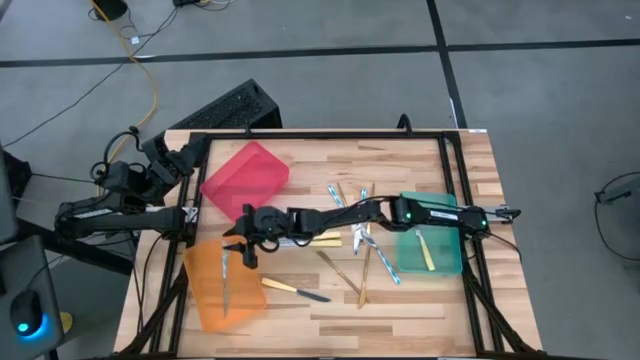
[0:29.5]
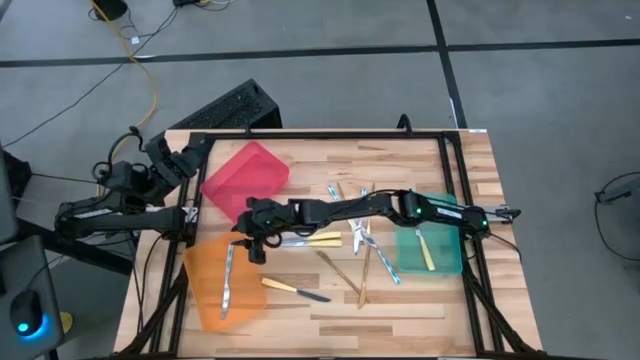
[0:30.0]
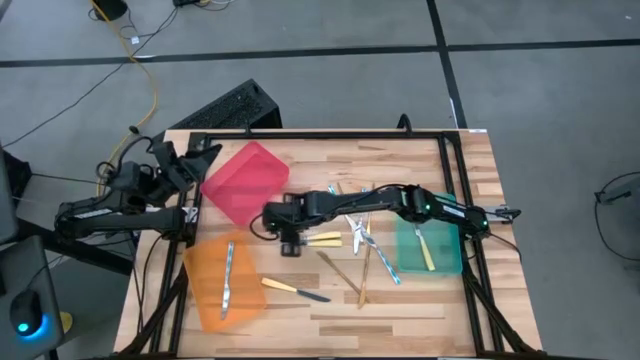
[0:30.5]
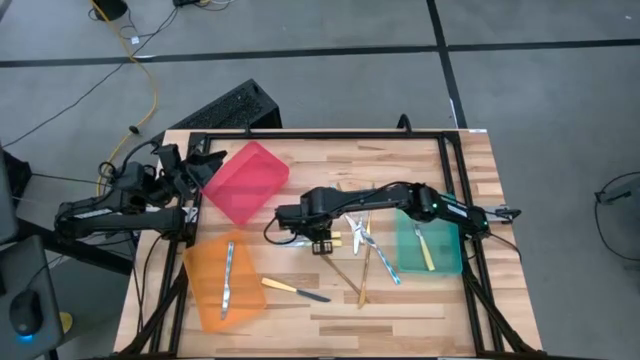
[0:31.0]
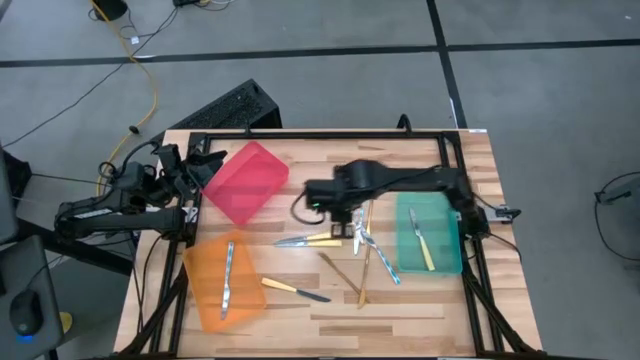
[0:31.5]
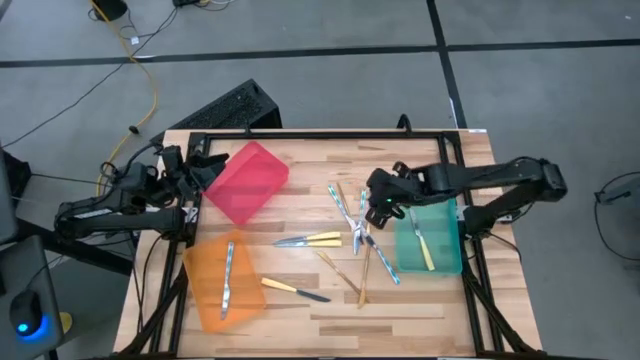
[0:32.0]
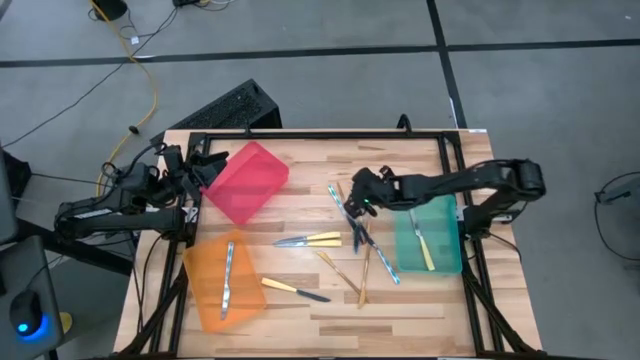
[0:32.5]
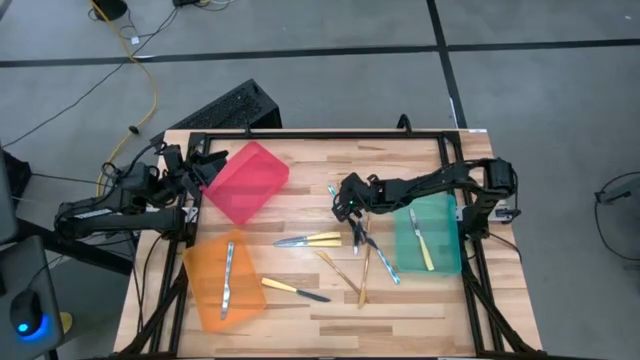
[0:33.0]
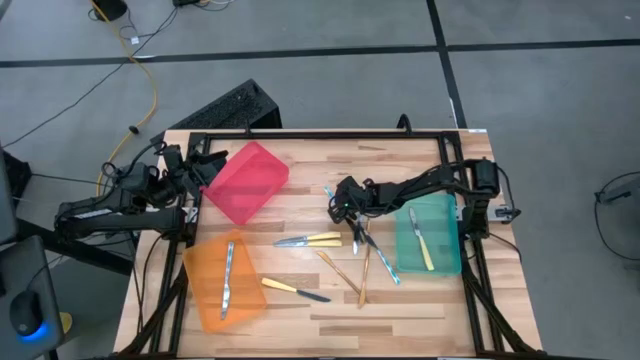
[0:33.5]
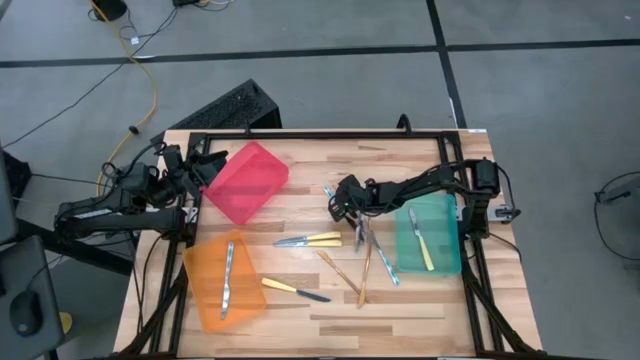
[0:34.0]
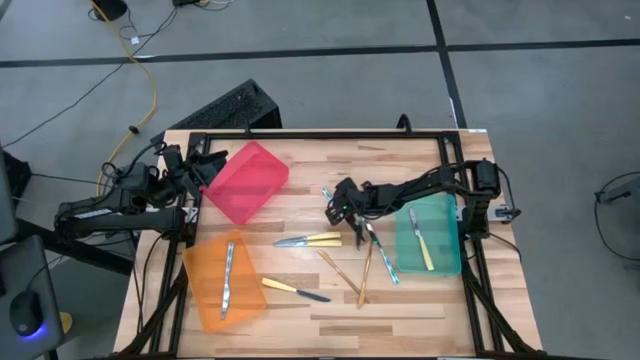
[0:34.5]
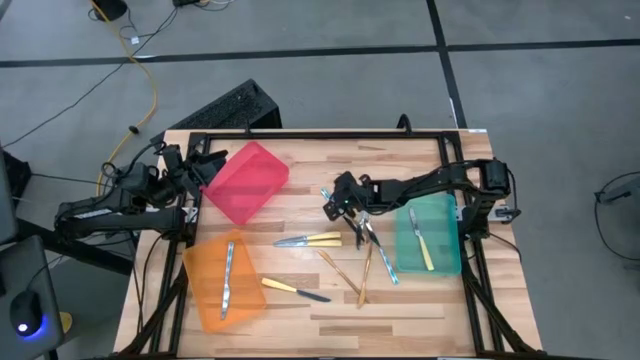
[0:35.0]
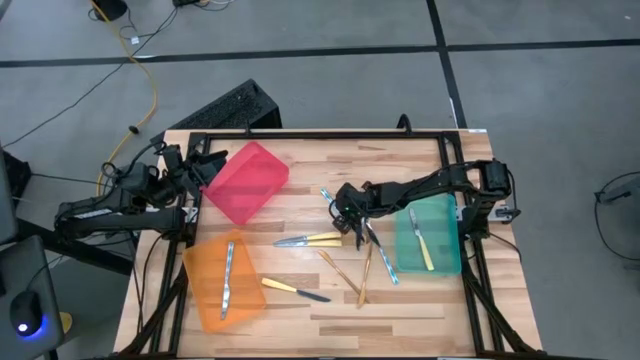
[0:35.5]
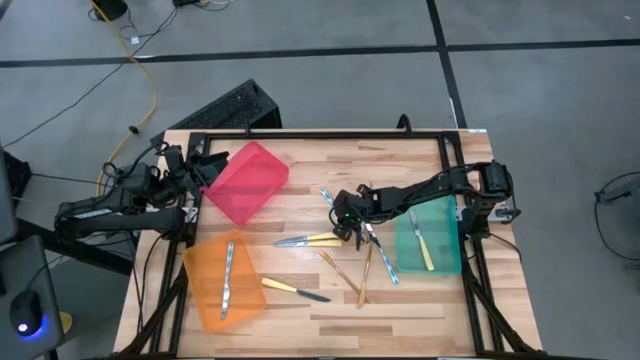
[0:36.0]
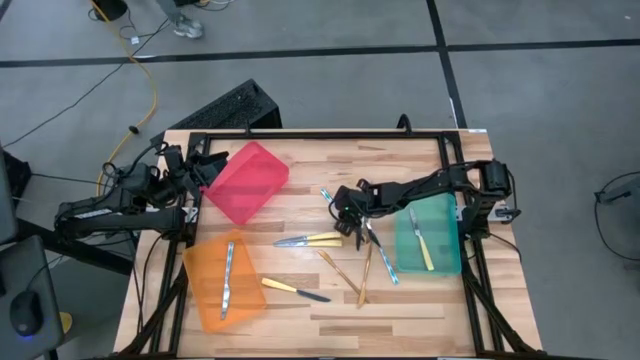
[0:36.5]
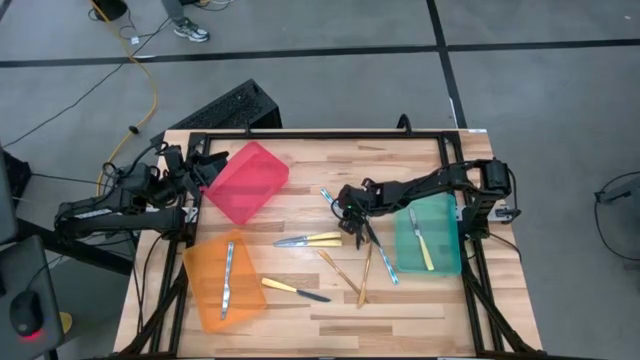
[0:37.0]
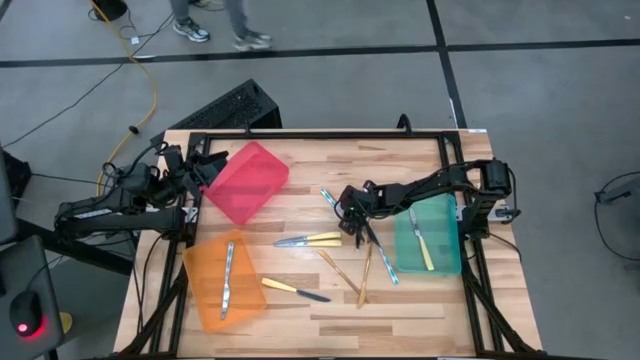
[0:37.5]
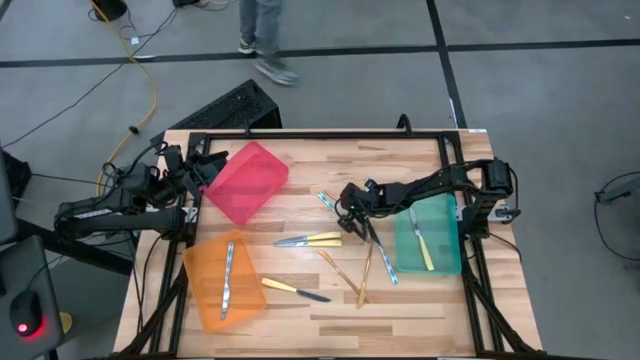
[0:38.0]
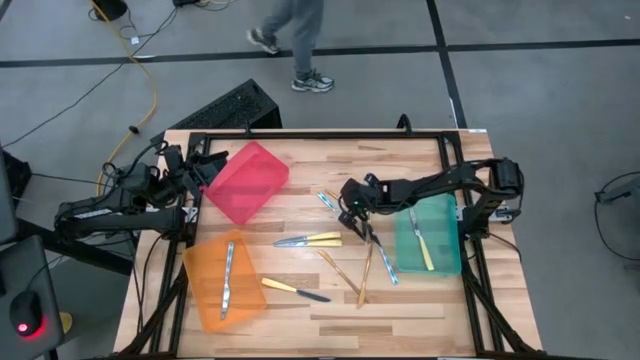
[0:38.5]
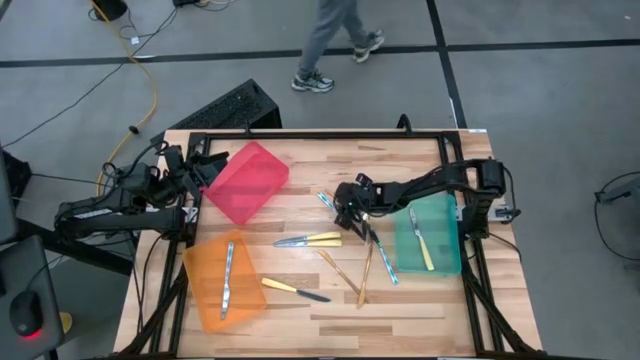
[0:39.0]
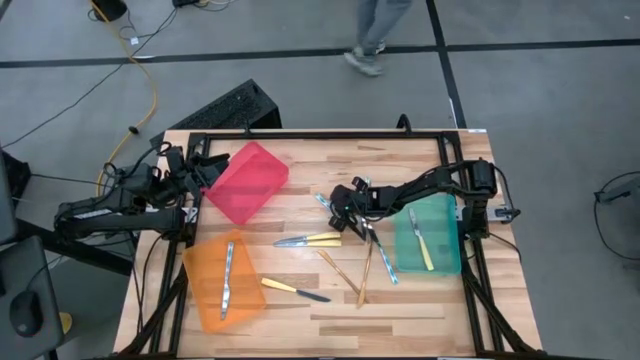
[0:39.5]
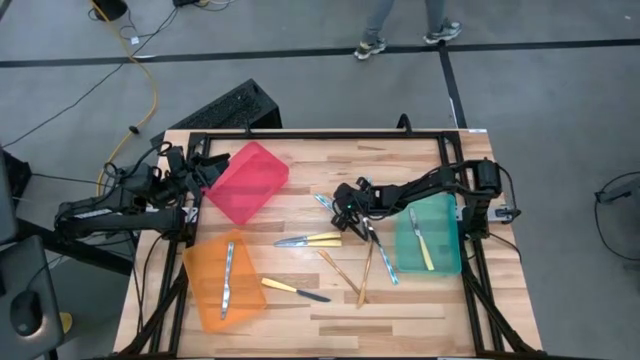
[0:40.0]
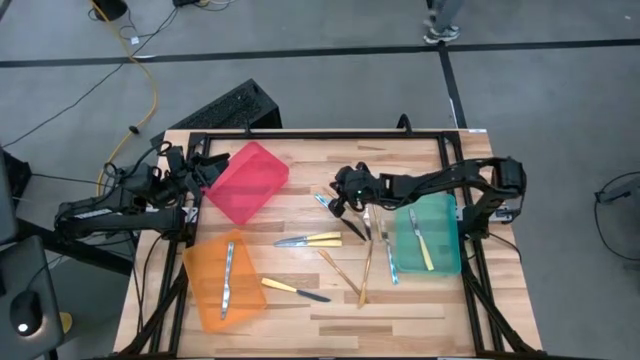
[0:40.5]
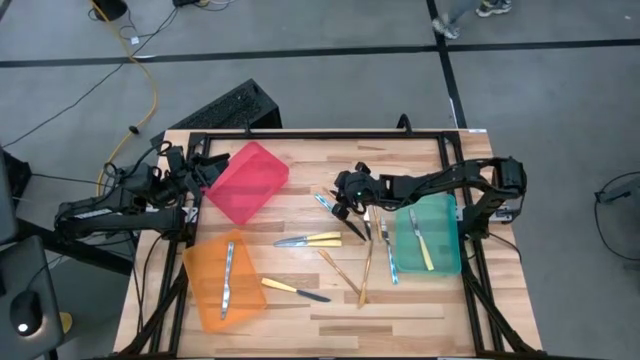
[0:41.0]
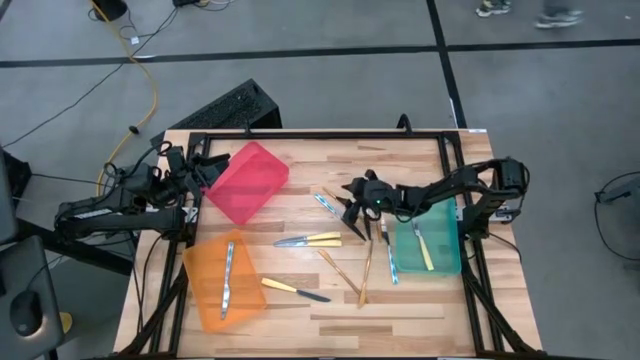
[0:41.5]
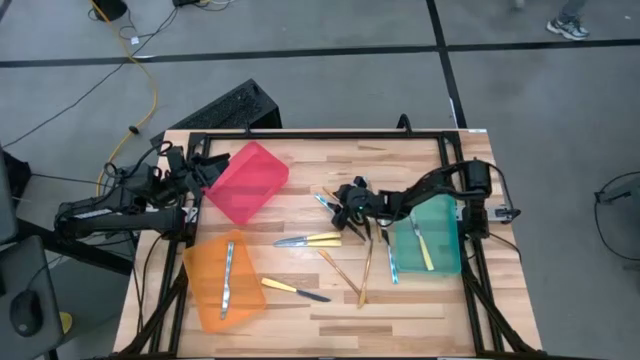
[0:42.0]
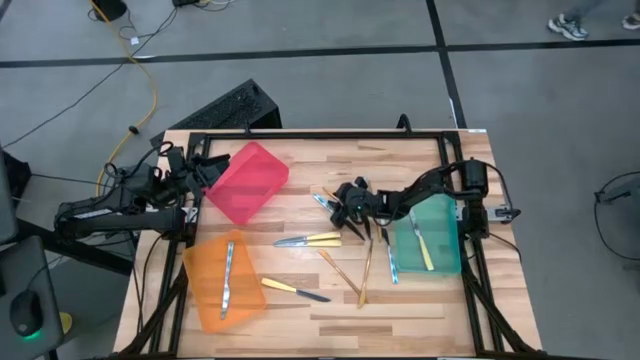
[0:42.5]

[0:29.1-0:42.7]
Task: Sort silverware by color (type)
Put the top left gold knife into the red bin

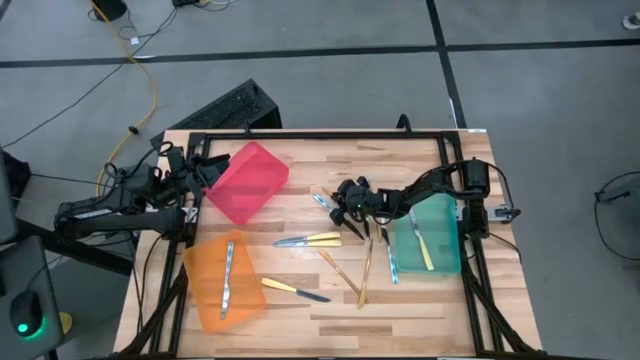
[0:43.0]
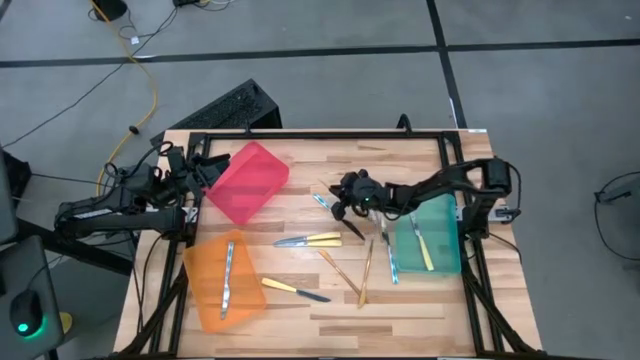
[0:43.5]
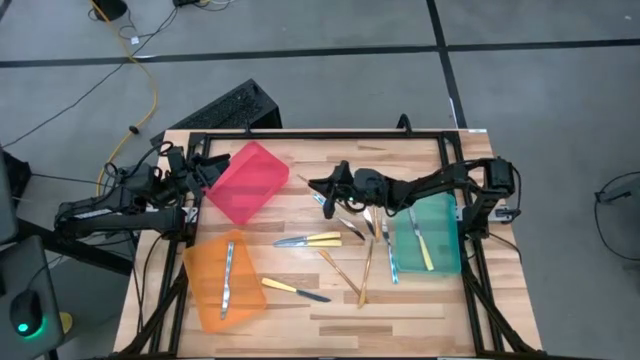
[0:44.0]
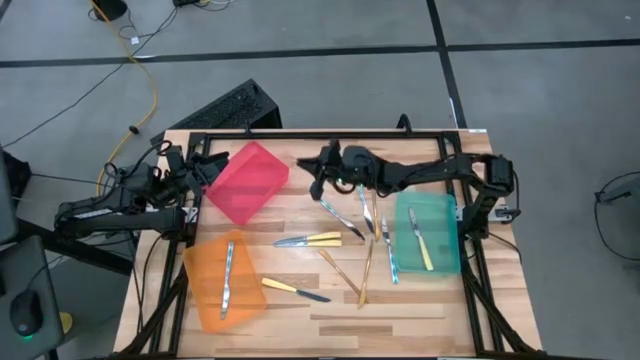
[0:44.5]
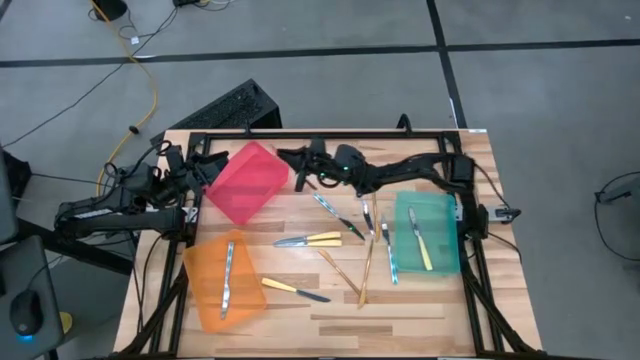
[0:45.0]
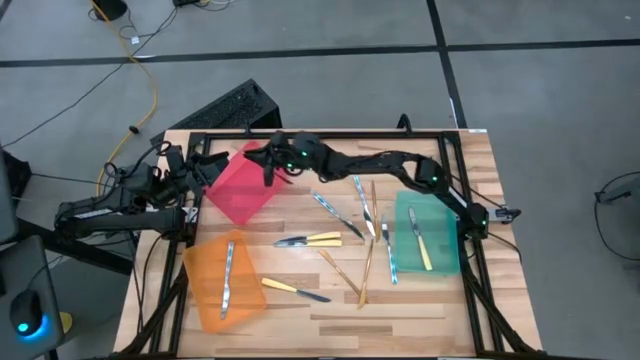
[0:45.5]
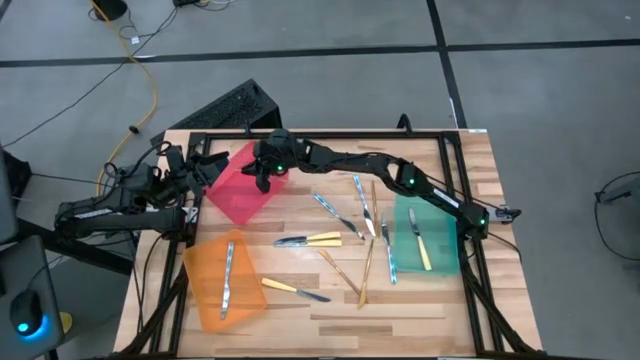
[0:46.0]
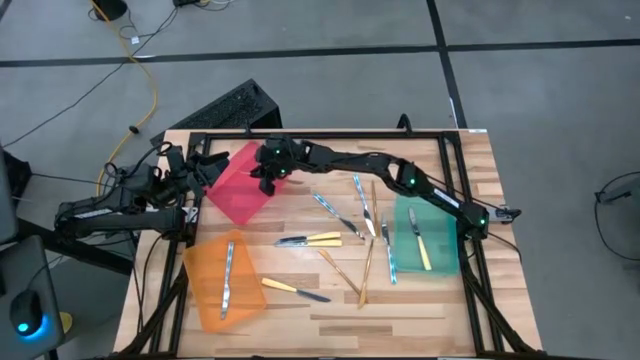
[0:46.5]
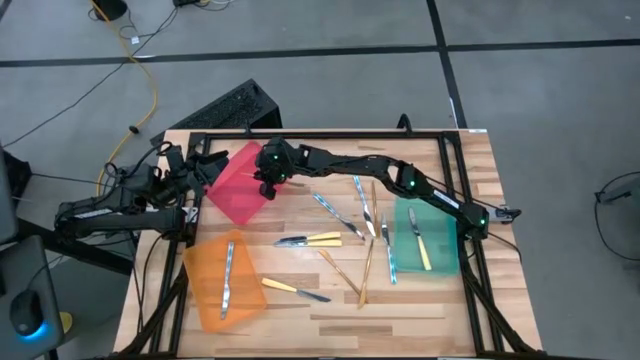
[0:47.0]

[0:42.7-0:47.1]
Put the top left gold knife into the red bin

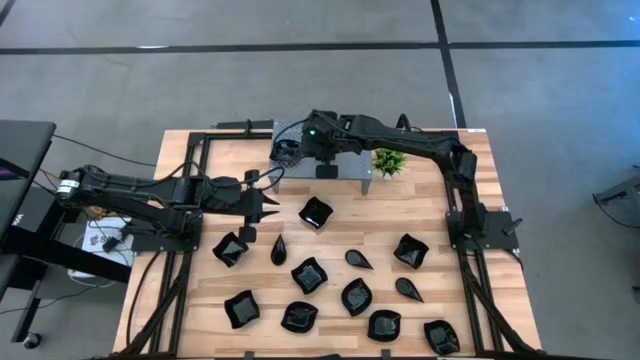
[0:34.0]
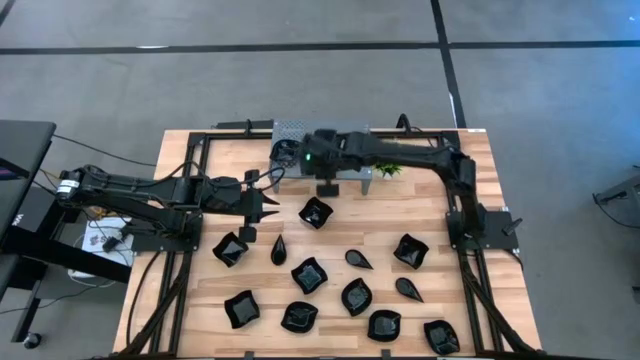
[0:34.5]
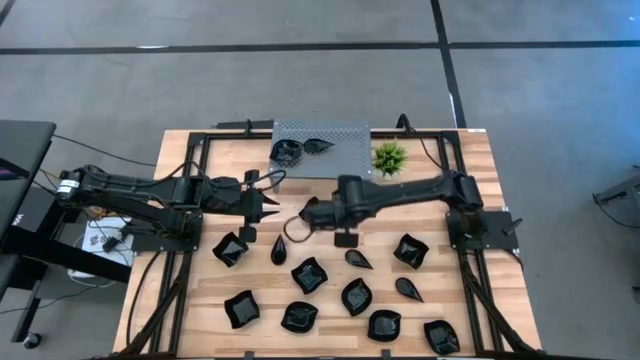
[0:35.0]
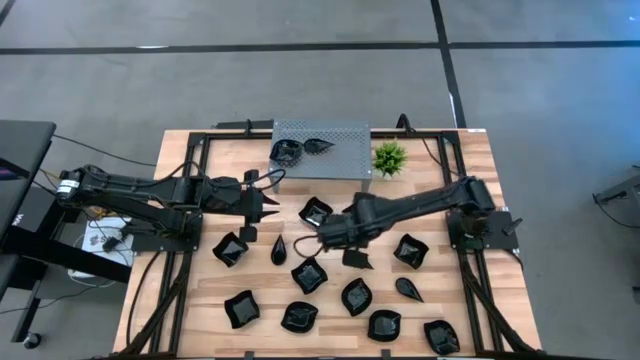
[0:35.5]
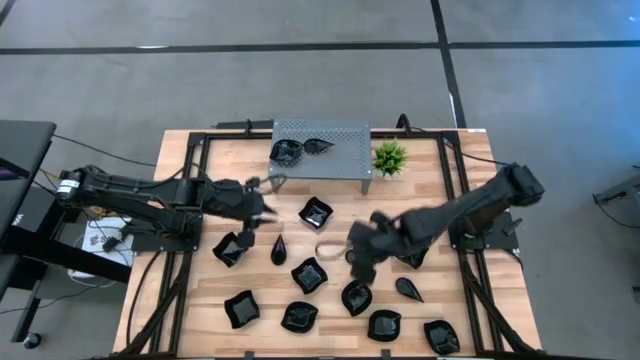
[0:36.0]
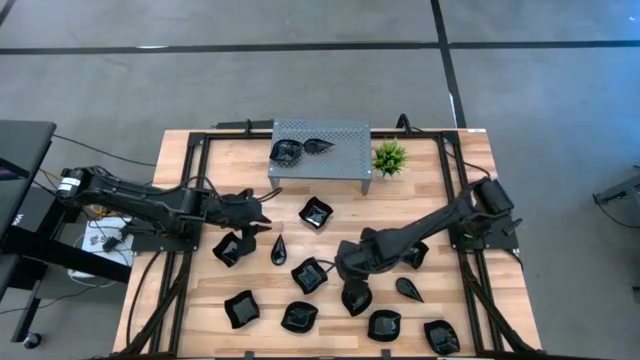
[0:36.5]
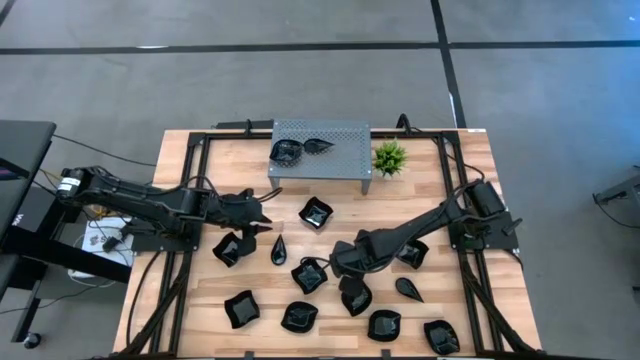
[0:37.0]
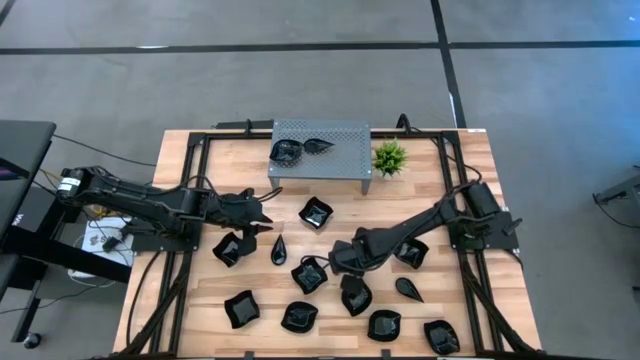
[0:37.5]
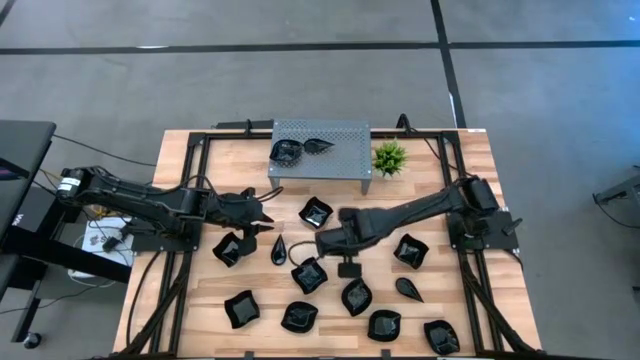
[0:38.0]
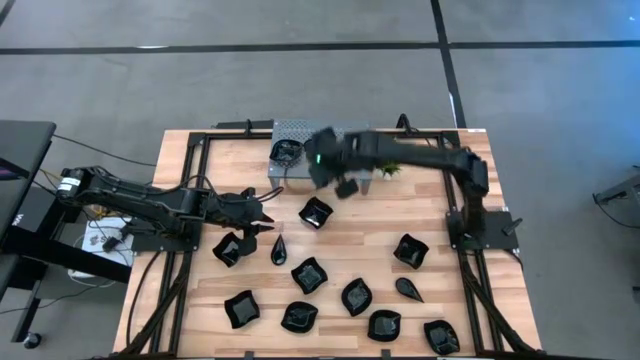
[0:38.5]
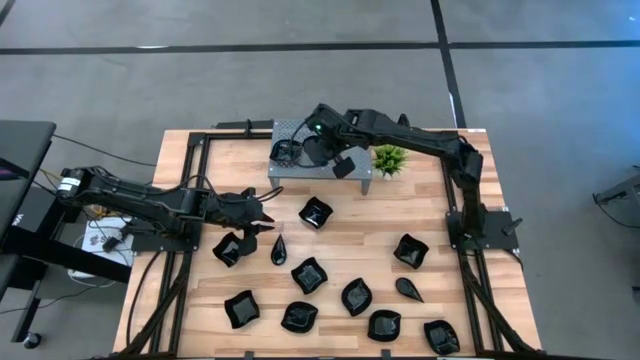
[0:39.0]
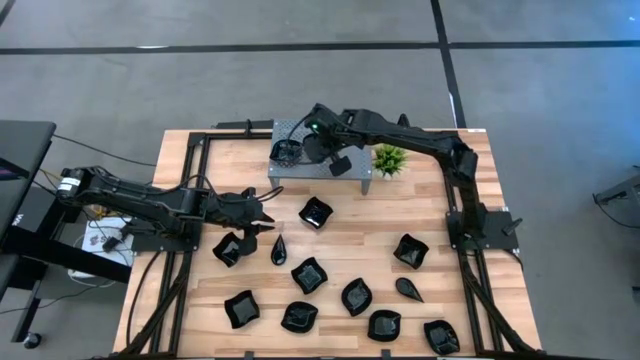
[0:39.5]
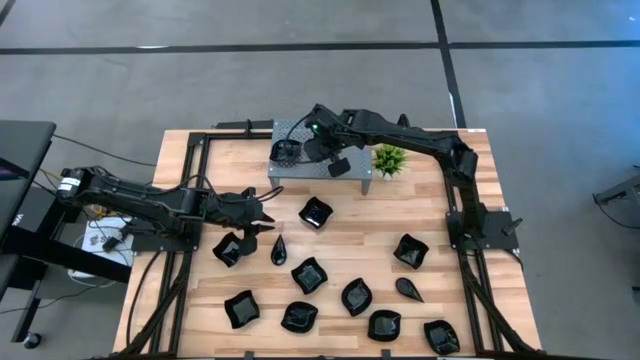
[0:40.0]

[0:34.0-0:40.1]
Task: Pick & Place Mini shaped plates
Stack the drop-shaped plate on top of the drop-shaped plate on the shelf
